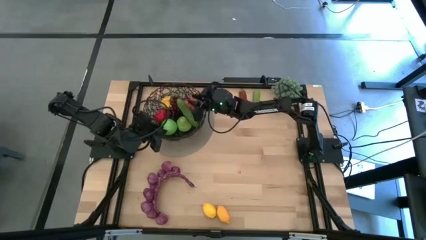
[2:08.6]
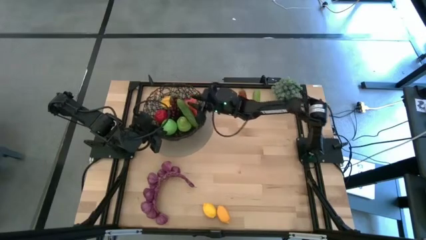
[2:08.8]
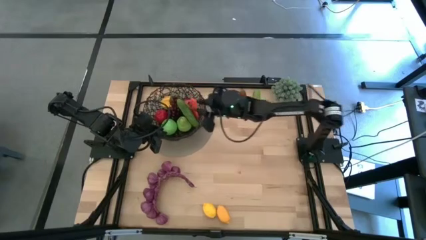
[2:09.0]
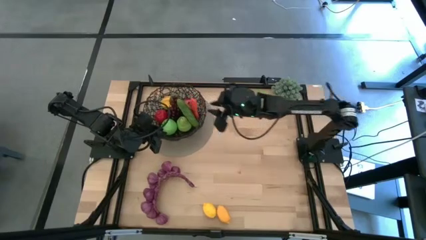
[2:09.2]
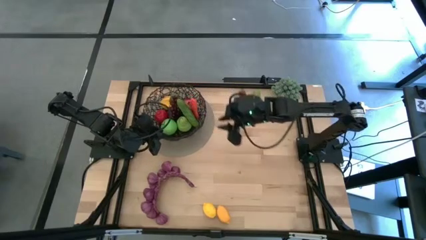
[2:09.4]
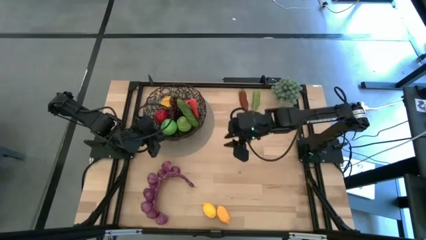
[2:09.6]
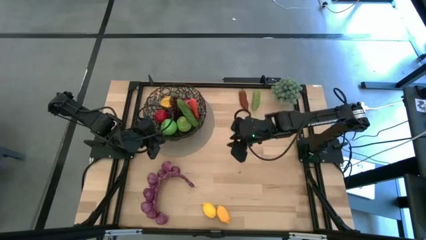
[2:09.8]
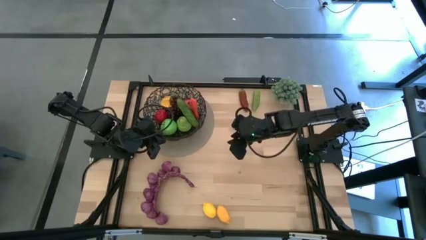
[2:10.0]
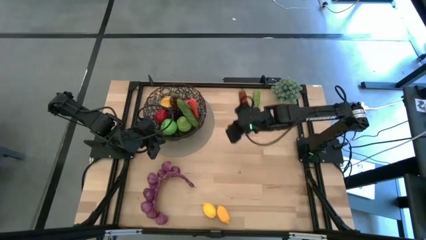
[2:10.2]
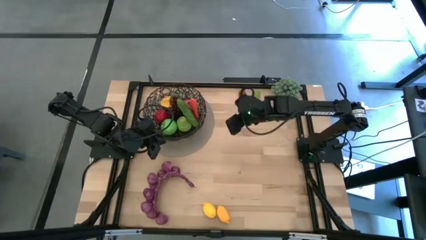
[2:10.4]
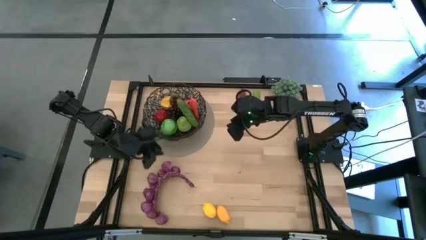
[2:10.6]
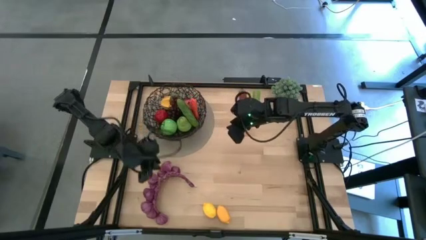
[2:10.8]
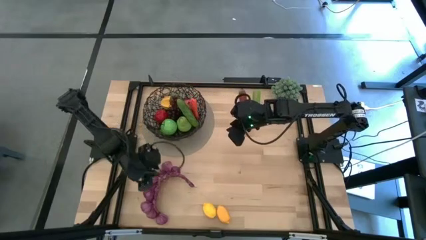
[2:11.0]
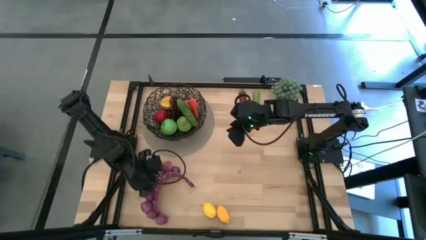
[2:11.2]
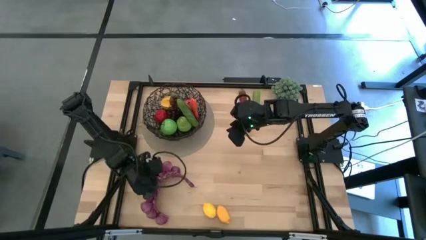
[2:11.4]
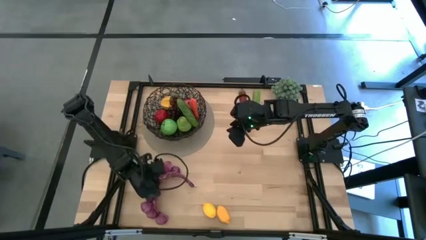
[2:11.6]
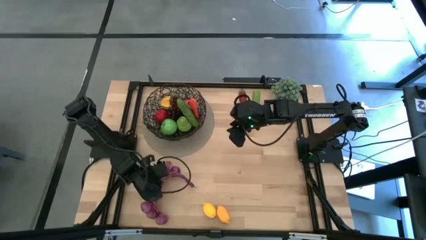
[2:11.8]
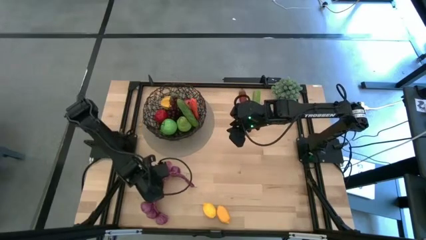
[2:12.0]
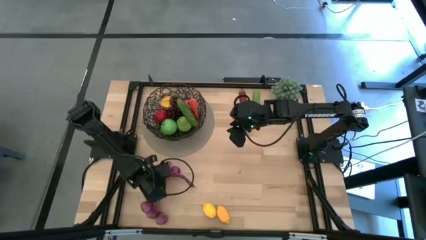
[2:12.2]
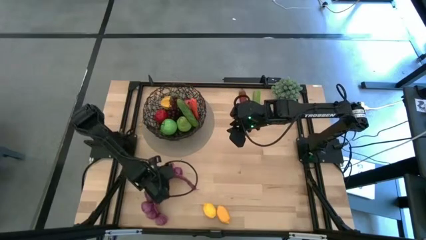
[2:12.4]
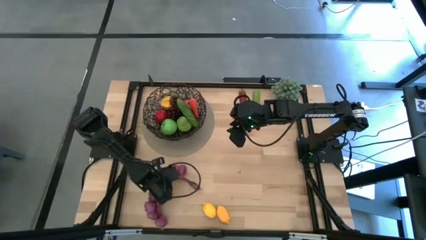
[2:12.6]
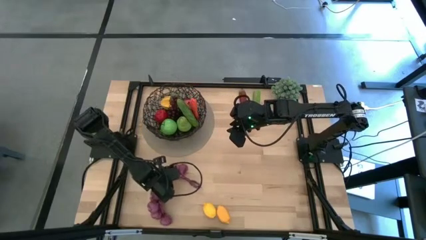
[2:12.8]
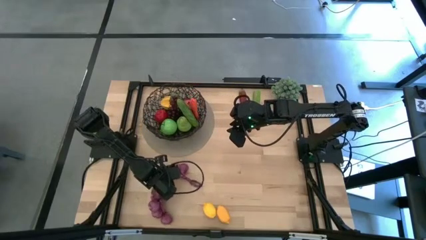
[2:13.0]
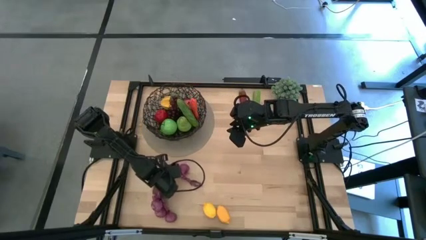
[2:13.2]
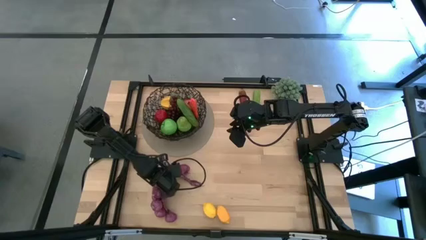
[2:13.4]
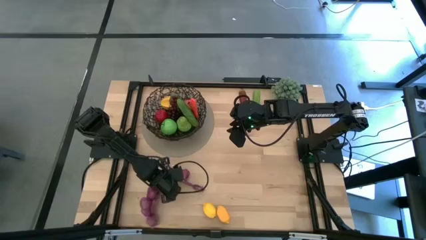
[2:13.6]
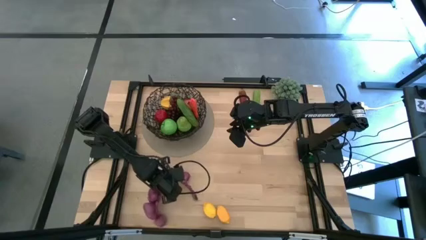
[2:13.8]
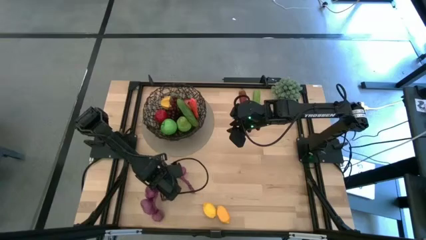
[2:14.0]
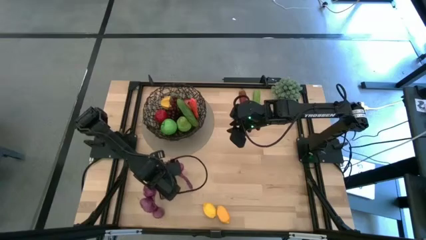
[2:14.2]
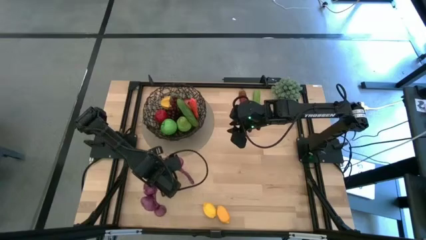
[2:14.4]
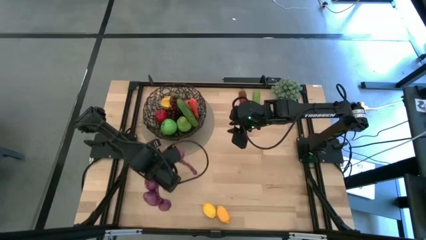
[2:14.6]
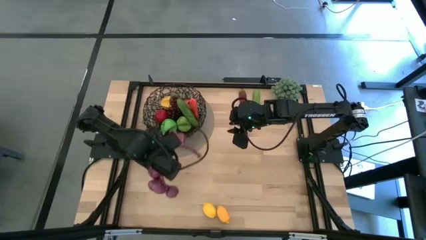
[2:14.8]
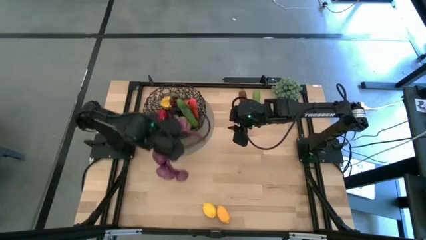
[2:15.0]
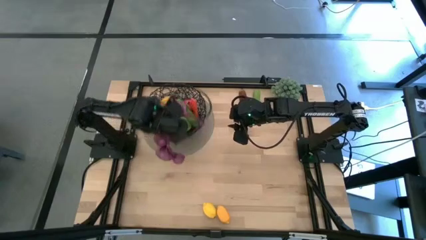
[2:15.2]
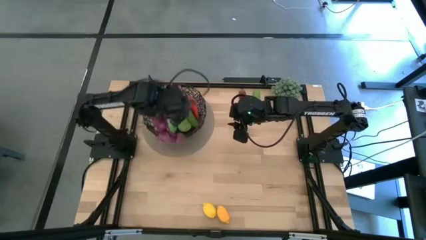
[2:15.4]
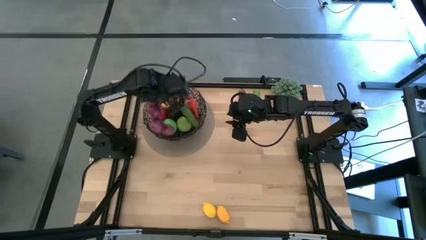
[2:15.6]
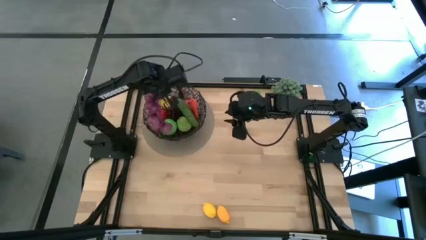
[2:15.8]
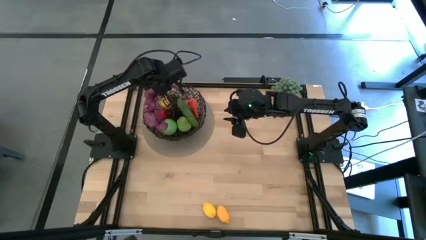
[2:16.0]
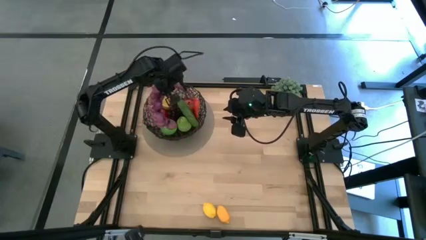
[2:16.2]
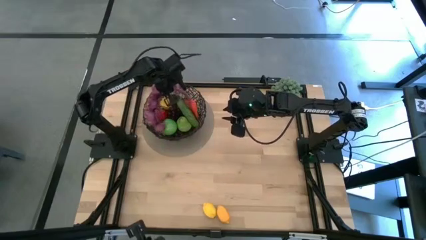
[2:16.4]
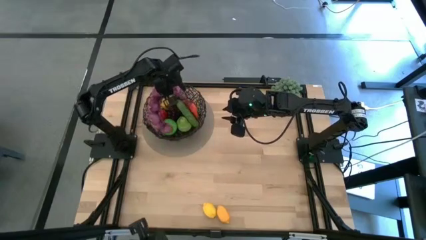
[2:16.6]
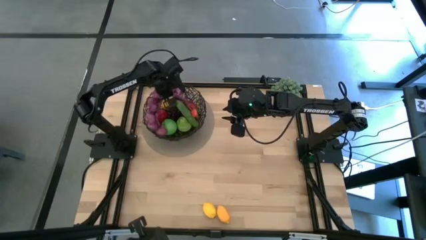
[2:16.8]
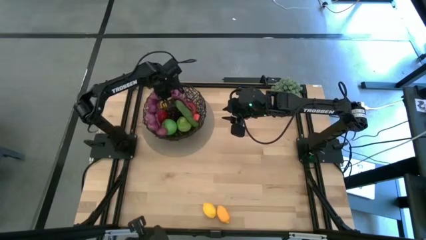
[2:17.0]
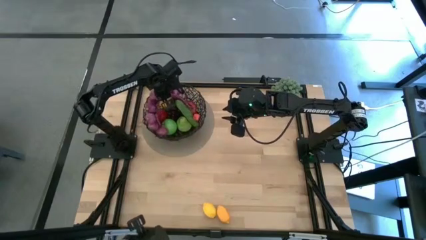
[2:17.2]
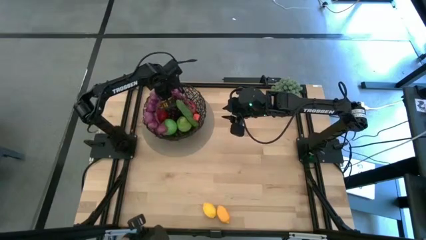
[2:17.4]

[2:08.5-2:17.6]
Task: Build produce basket
Put the purple onions into the black wire basket

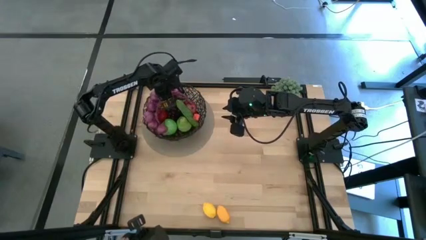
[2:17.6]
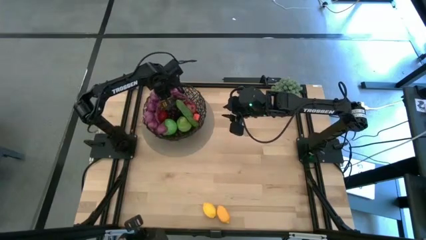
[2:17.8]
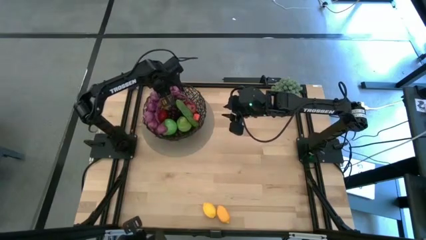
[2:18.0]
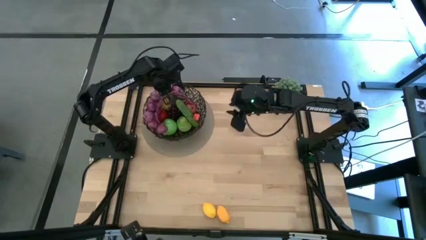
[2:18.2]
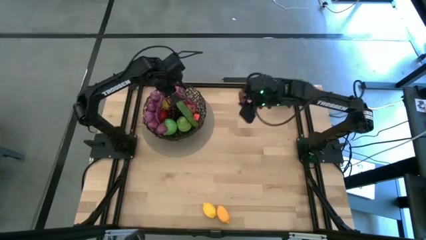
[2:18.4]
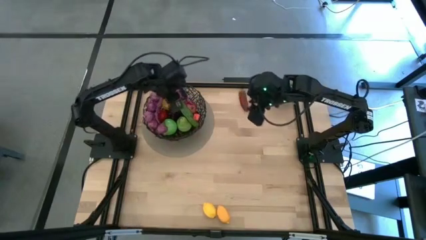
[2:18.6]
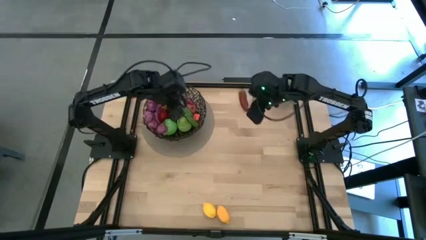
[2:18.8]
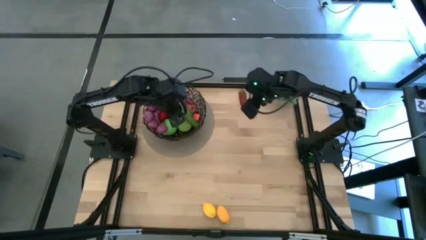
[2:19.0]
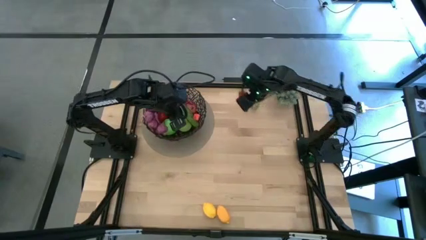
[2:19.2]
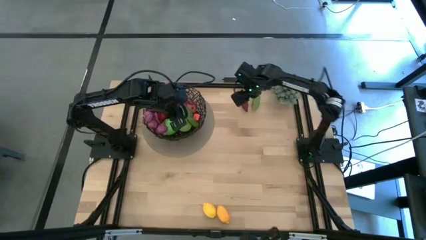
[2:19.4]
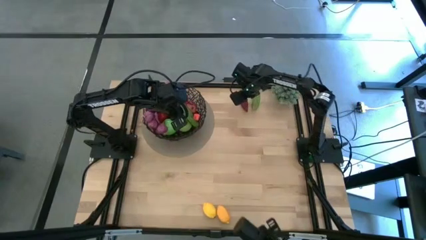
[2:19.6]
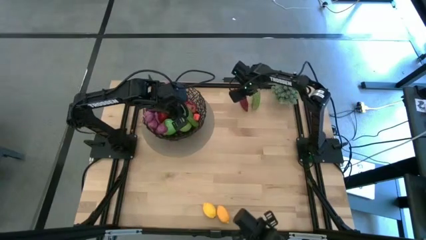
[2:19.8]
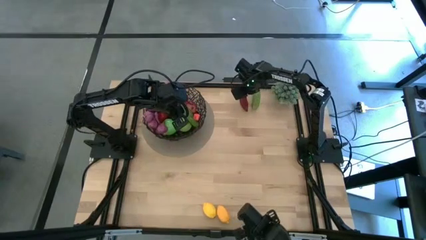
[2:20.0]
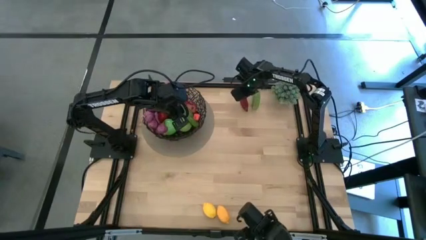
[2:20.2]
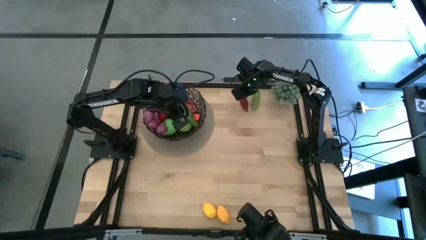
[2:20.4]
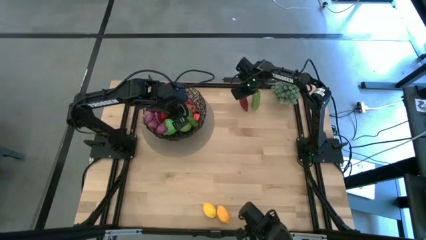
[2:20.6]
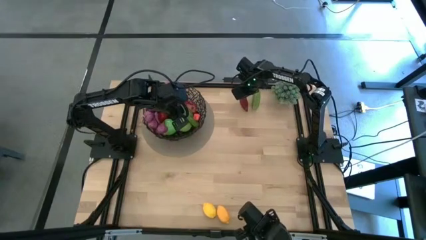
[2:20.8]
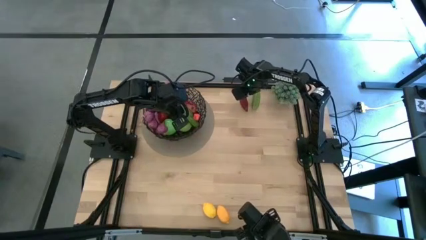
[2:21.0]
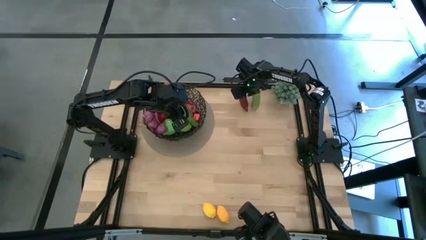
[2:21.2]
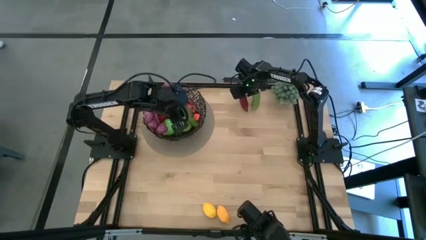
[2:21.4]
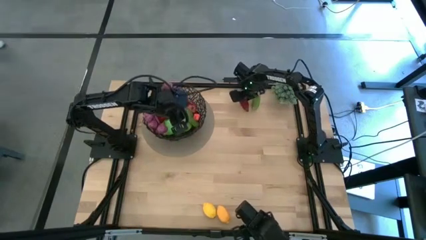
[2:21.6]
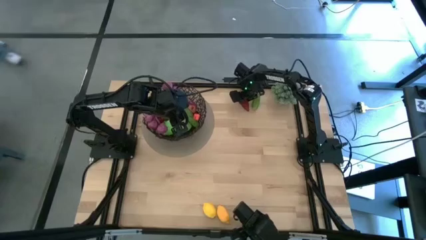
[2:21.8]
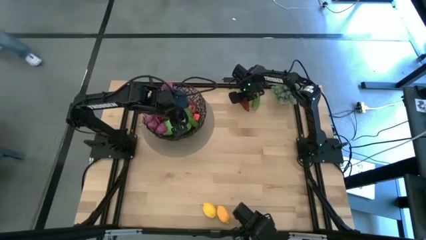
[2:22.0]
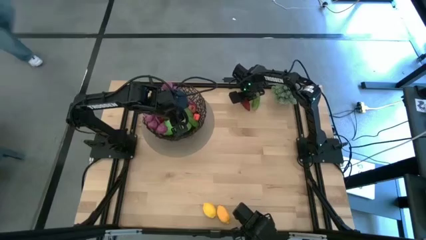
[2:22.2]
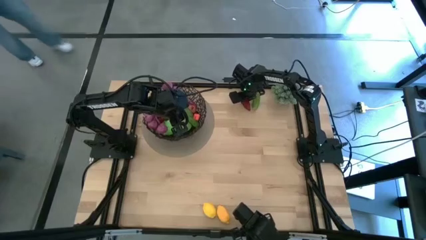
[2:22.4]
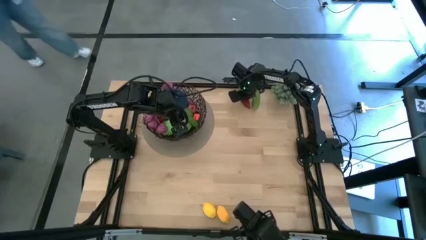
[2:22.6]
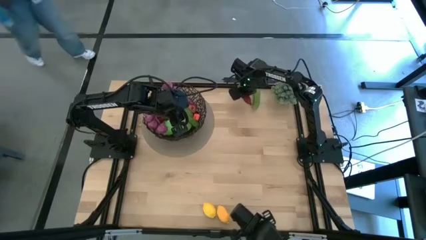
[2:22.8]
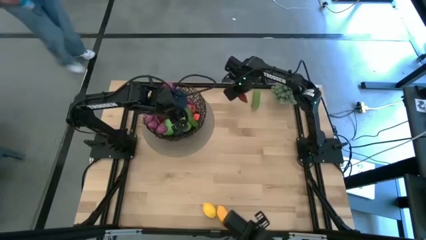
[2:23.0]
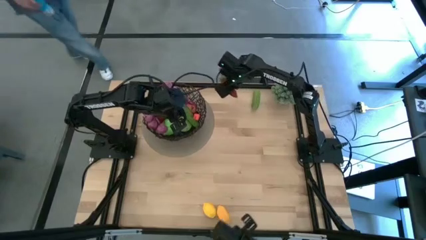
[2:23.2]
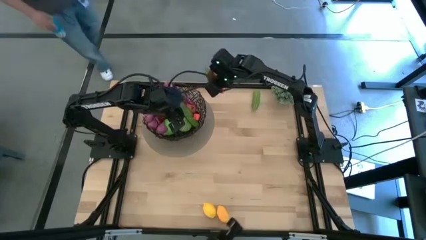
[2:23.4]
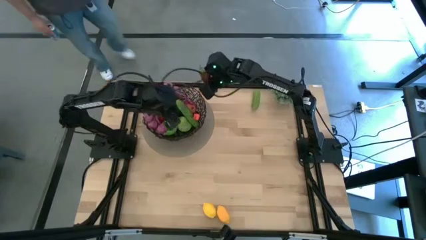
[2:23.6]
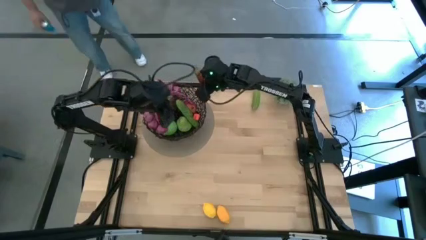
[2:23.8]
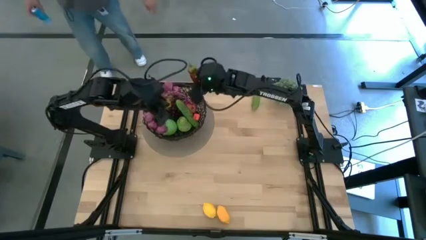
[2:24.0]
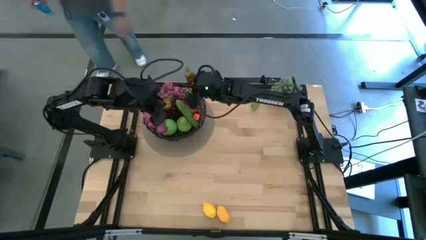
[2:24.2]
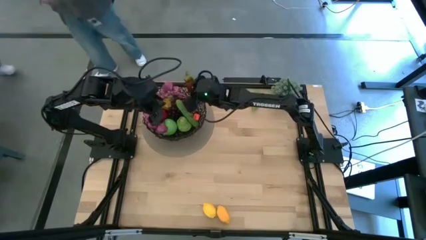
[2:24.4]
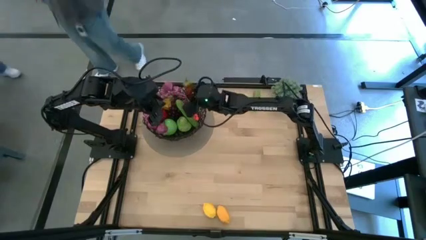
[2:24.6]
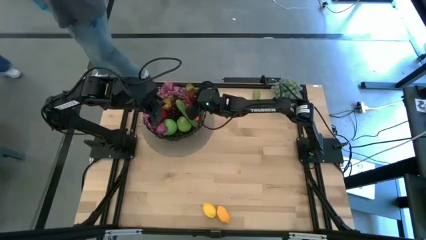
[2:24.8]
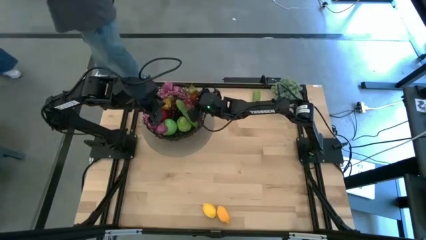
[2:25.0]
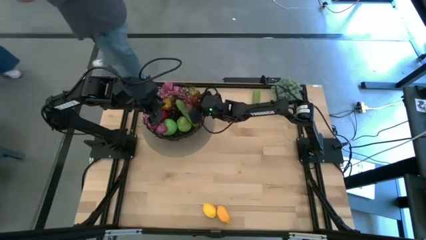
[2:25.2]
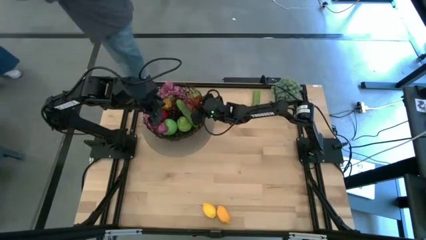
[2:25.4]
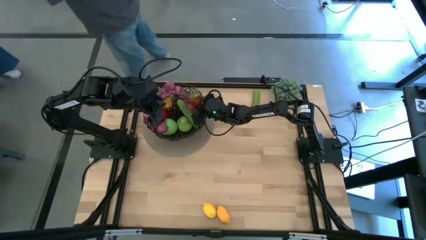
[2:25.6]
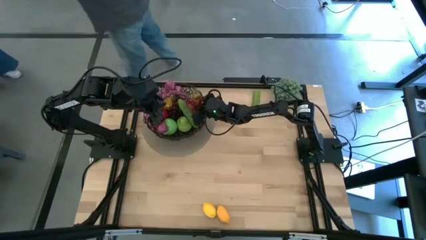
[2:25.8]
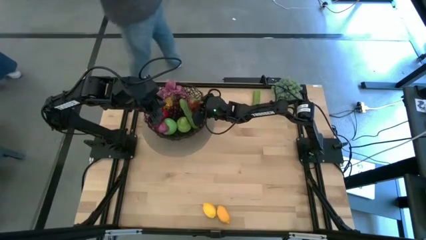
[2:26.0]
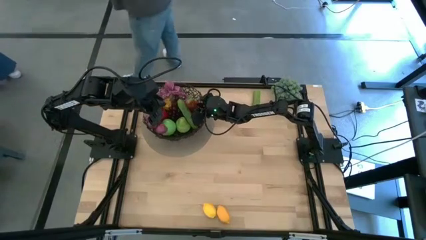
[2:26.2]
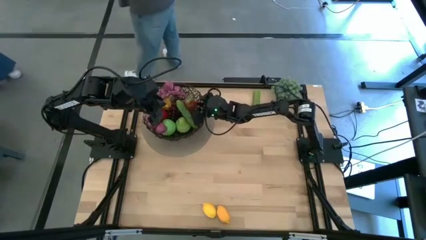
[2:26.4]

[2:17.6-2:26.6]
Put the red and green bell pepper into the black wire basket
